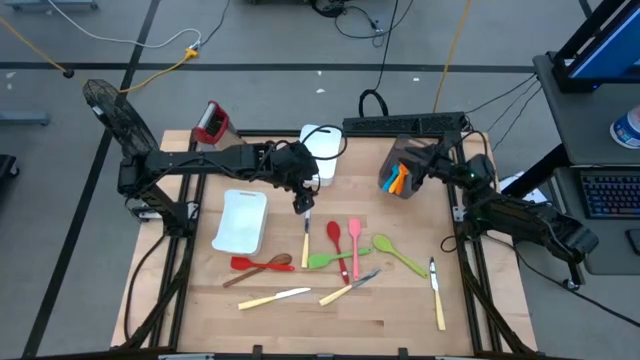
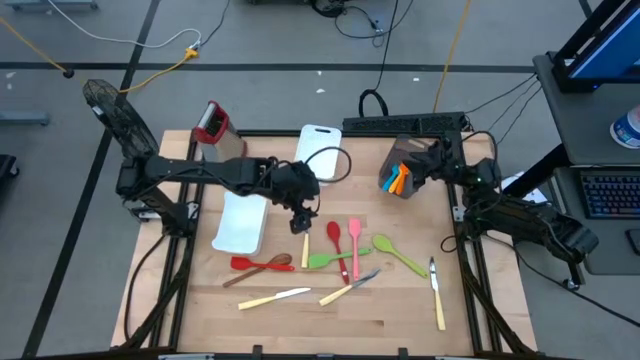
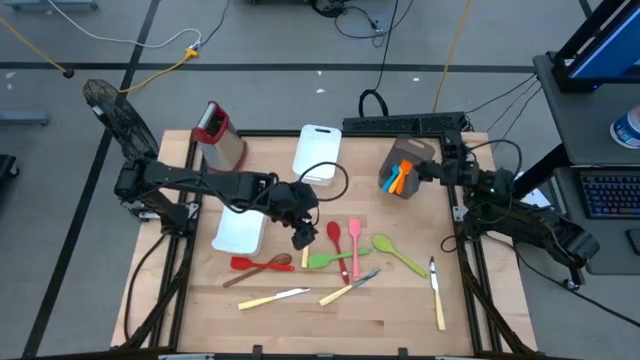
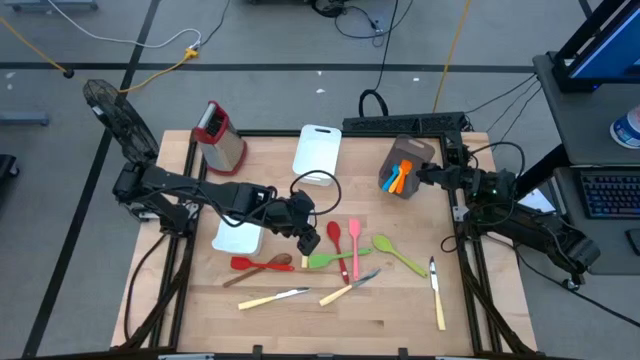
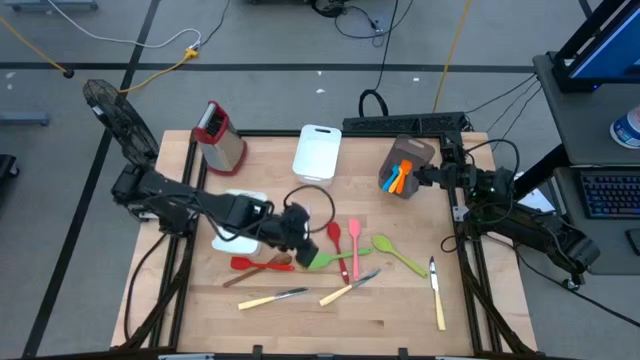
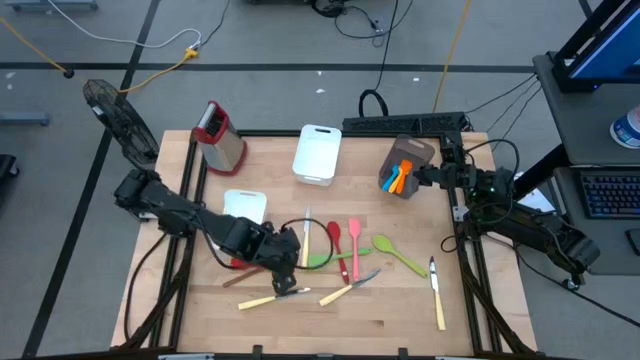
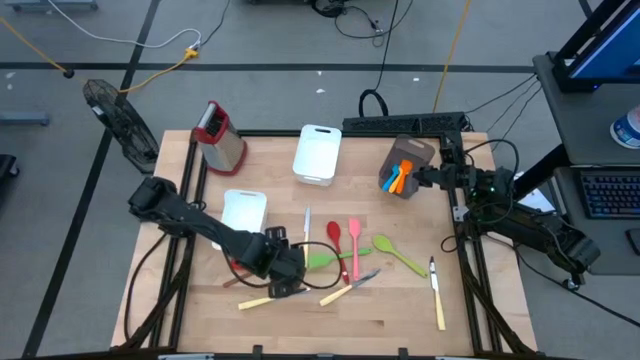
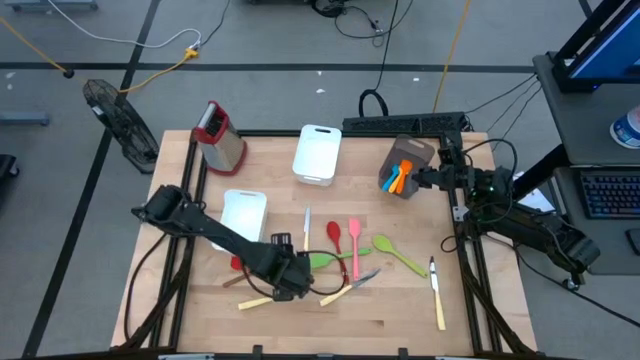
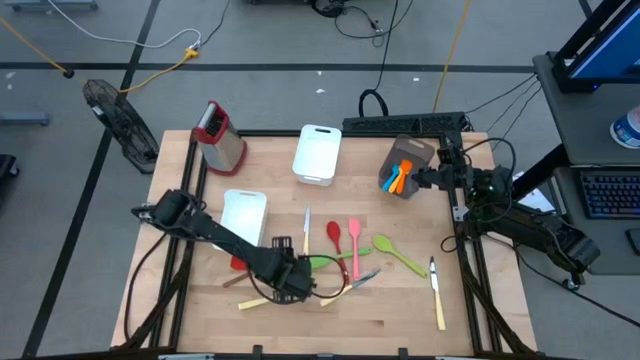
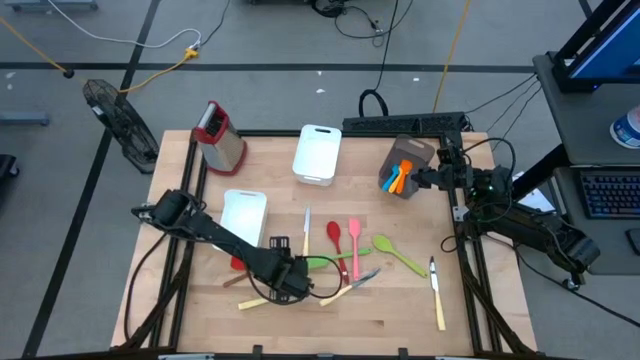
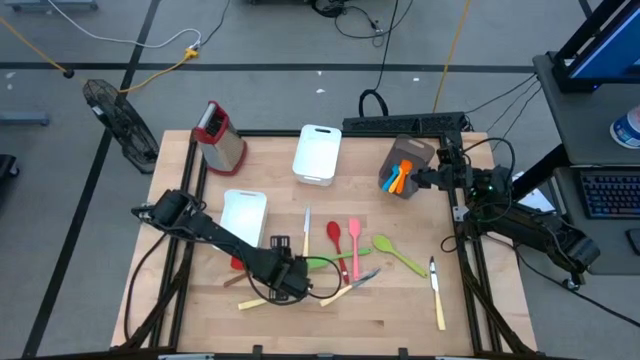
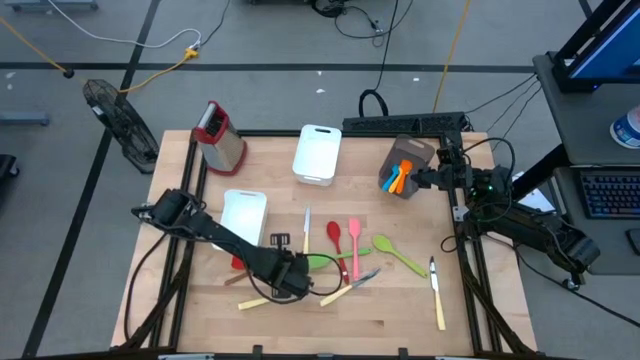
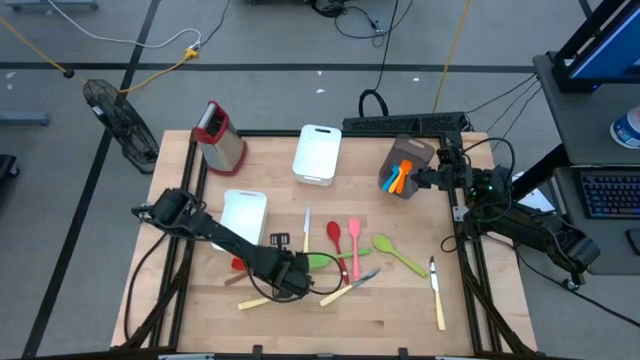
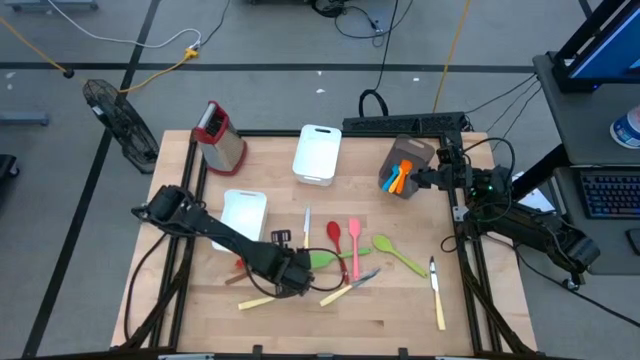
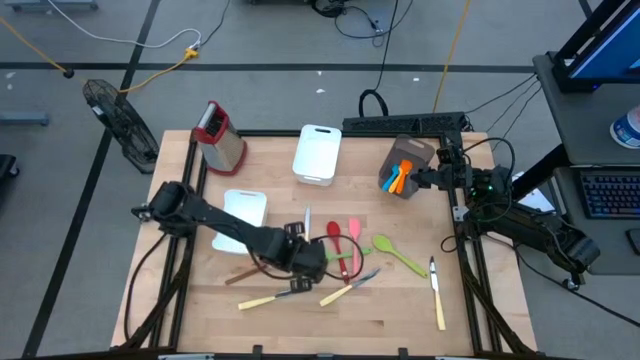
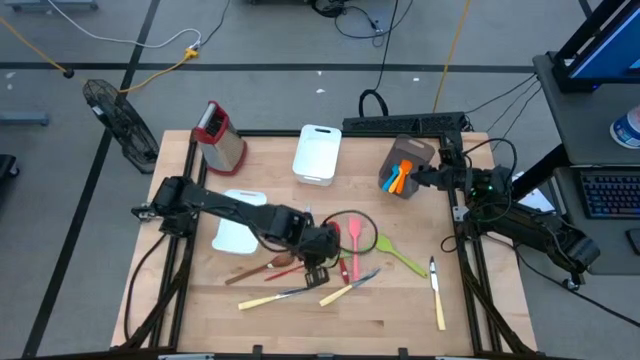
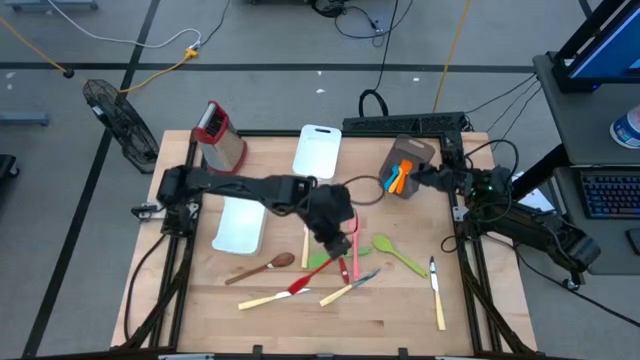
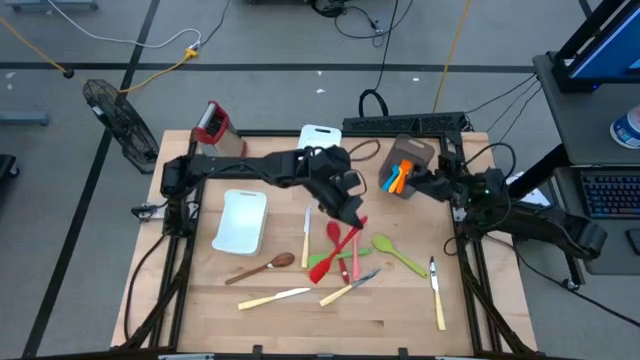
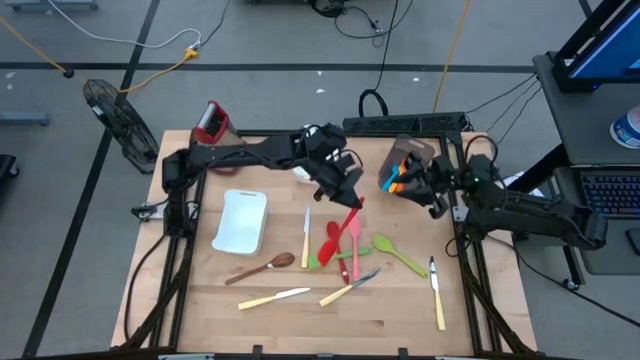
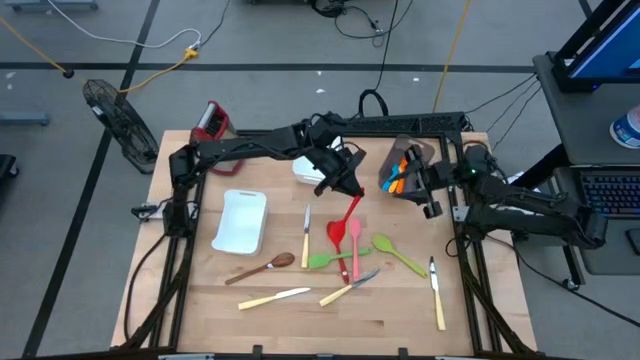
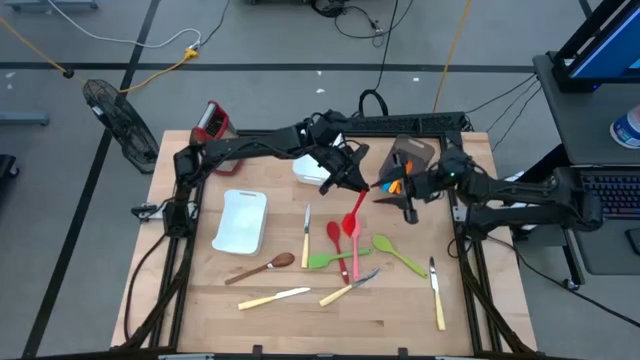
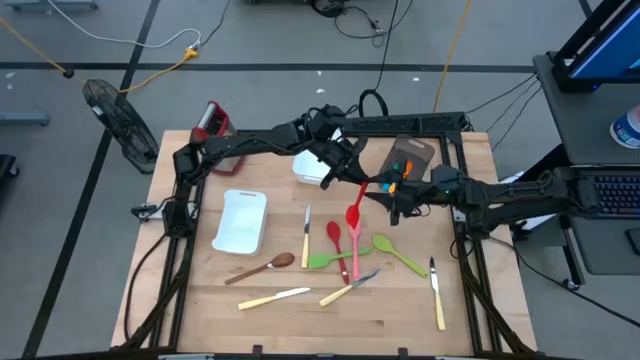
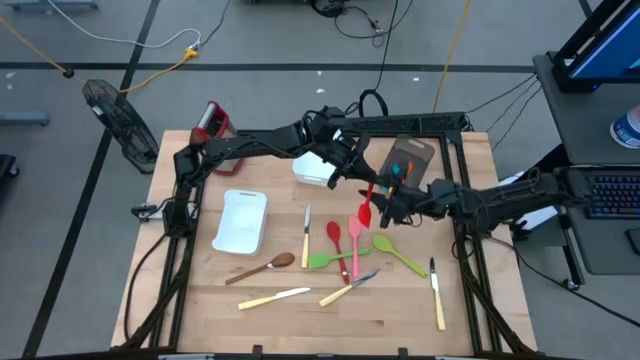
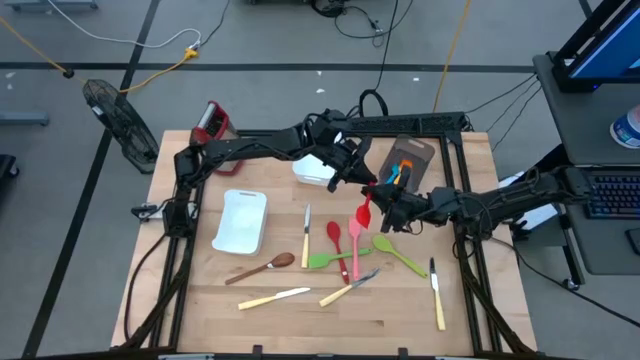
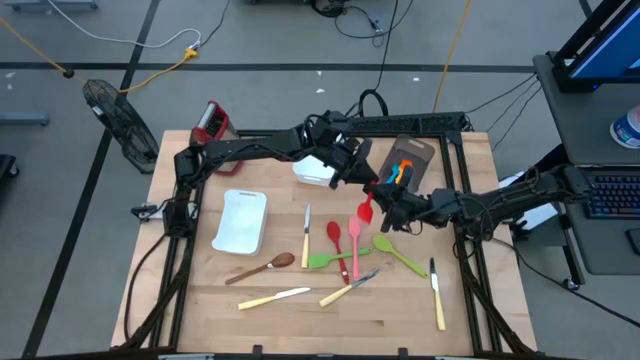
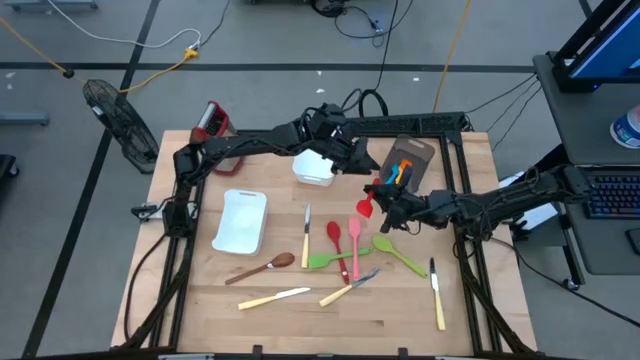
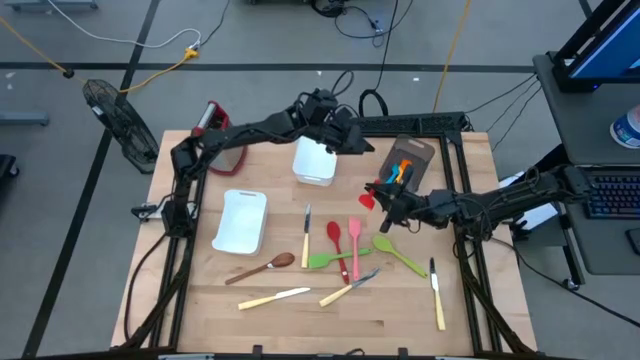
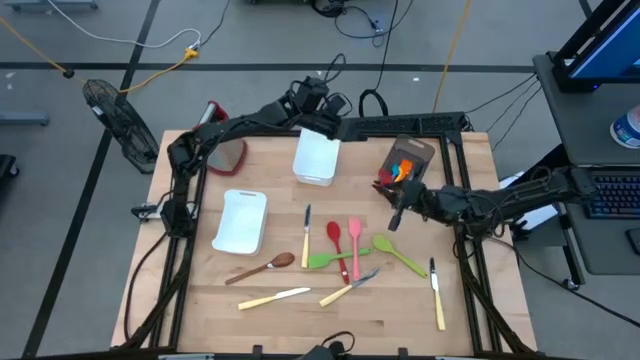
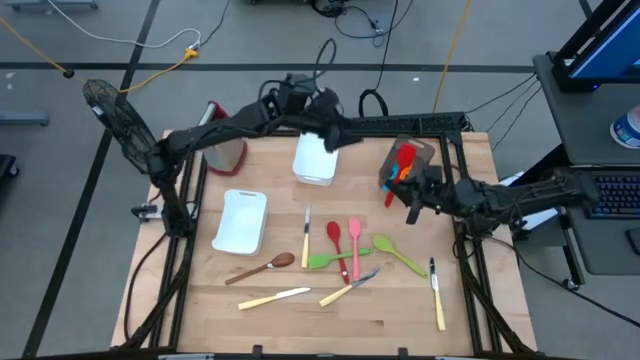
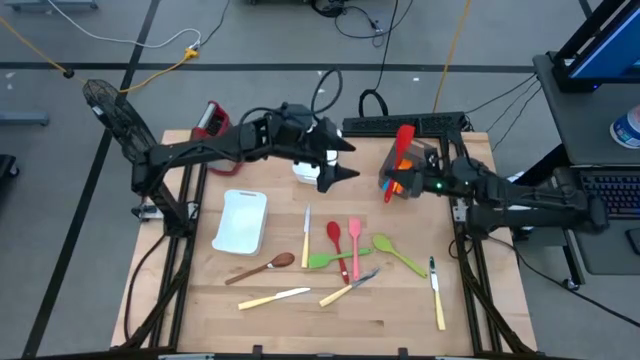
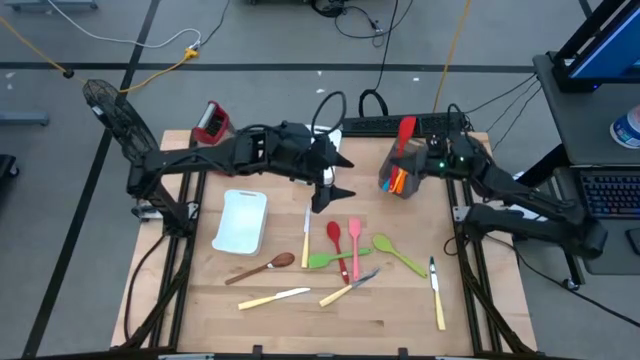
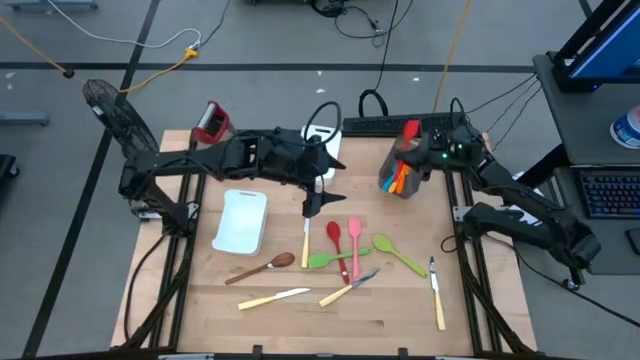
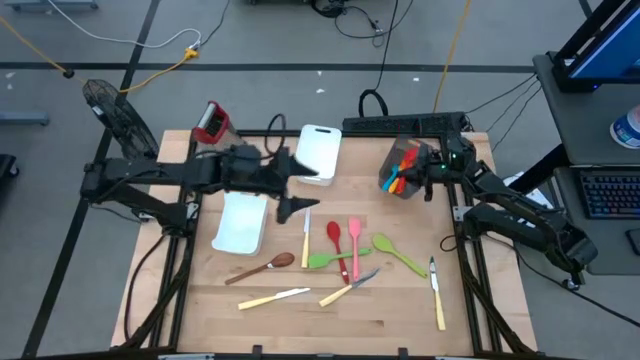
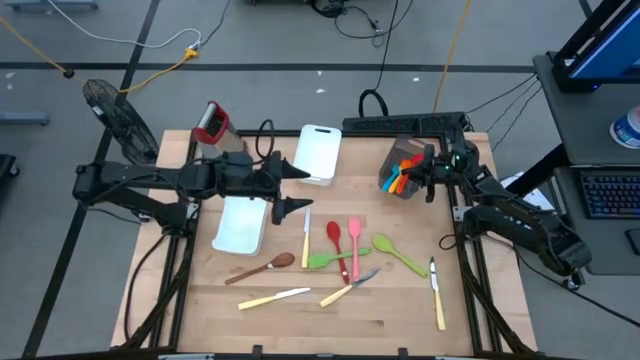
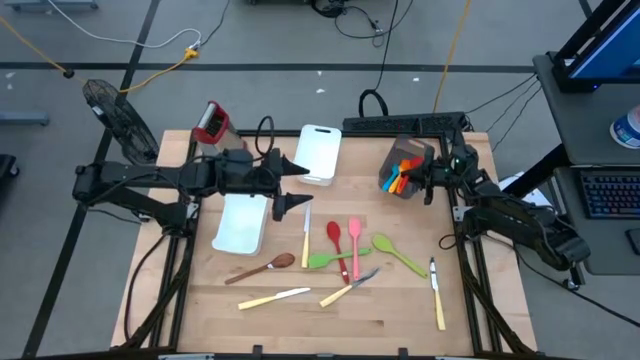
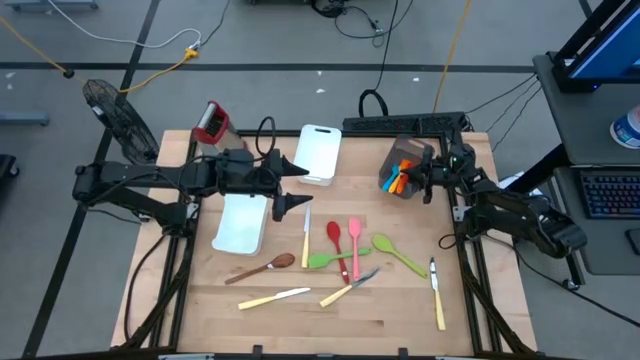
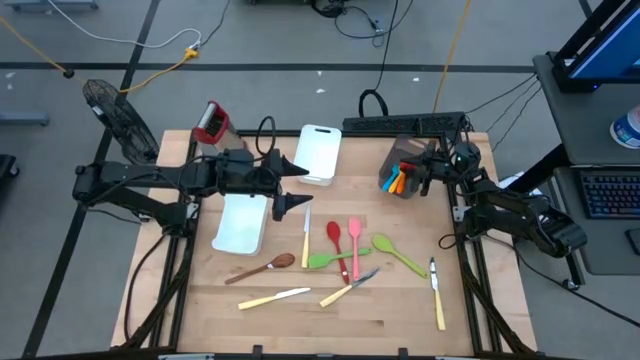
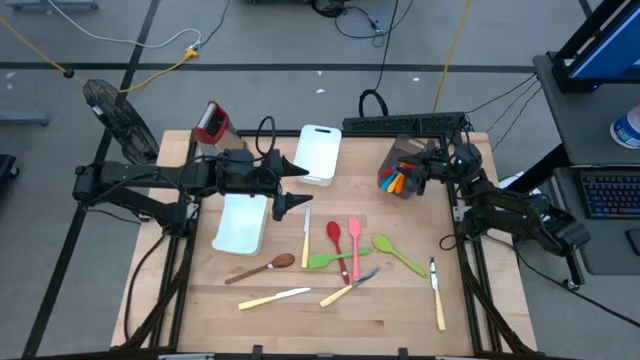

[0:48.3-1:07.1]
Task: Pick & Place Kitchen Items
Put the red spatula into the black bin

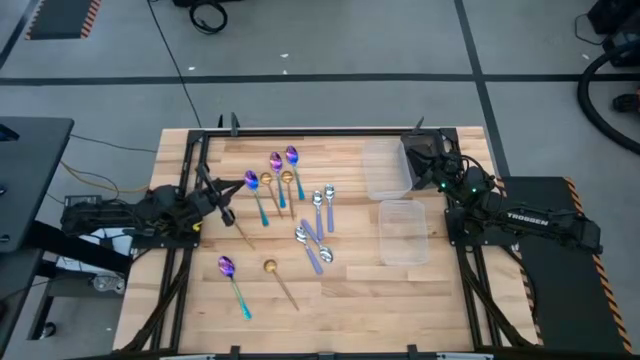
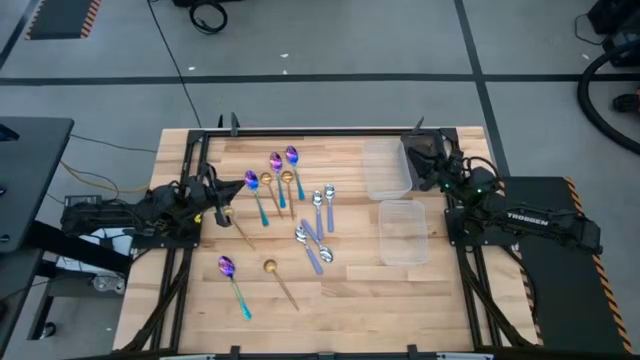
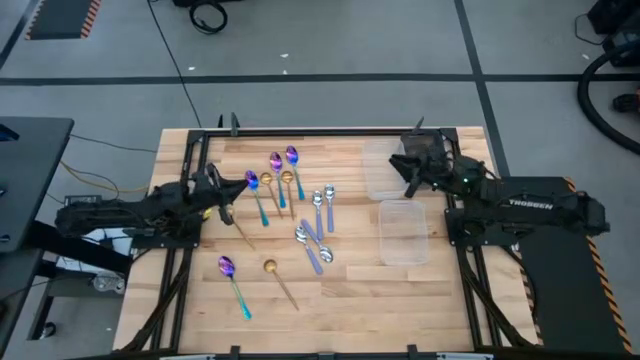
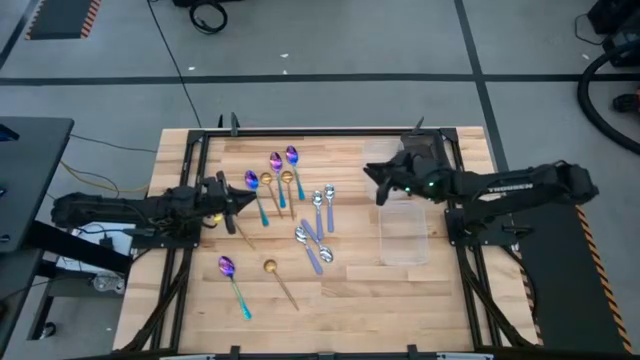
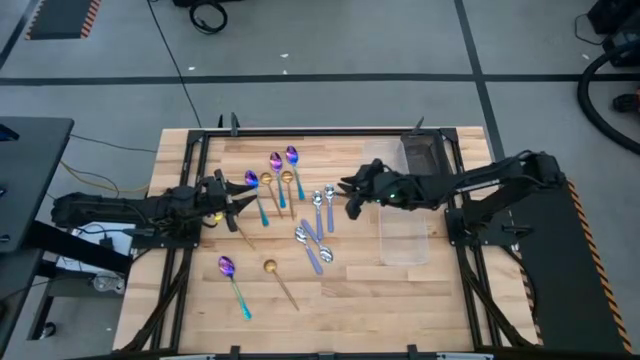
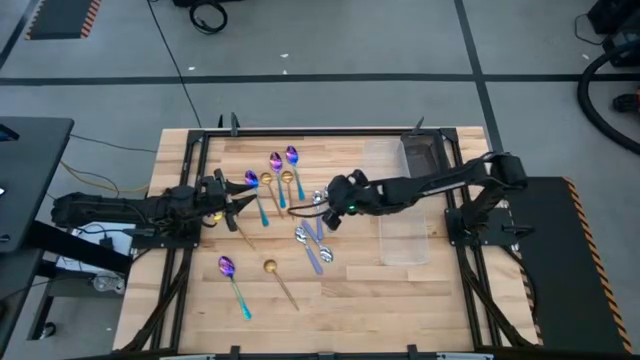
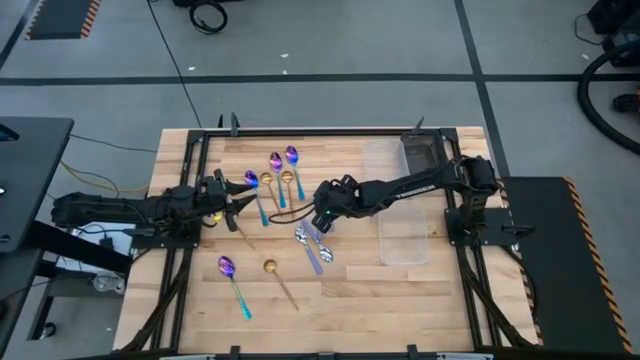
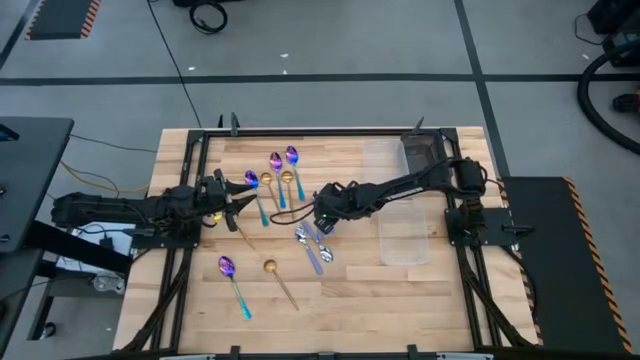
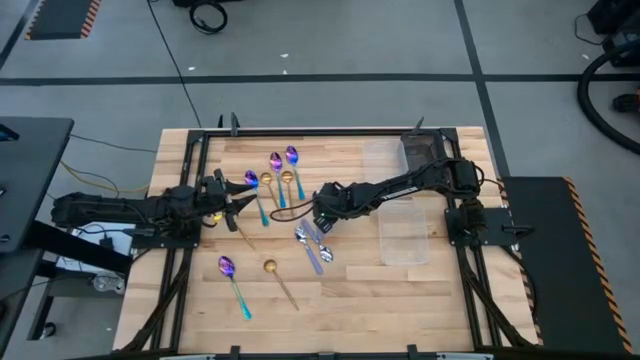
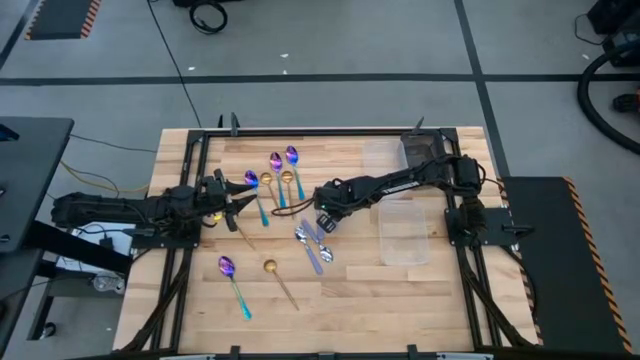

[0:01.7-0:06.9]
Task: Sort silverware by color (type)
Put the purple spoon into the top transparent bin
